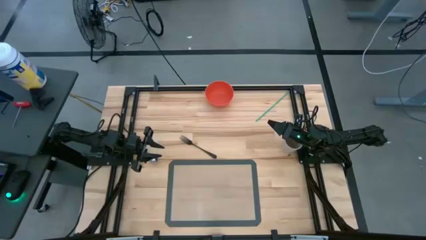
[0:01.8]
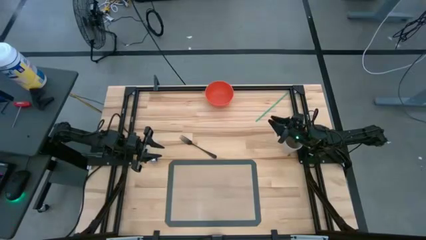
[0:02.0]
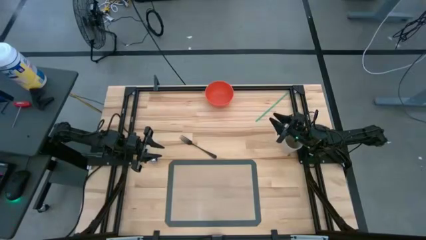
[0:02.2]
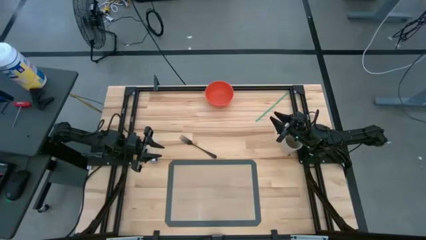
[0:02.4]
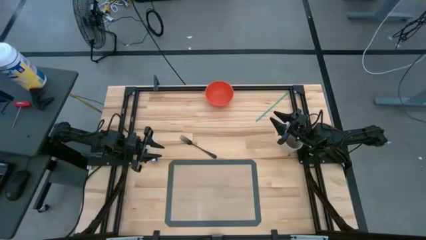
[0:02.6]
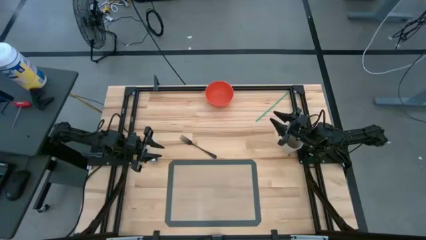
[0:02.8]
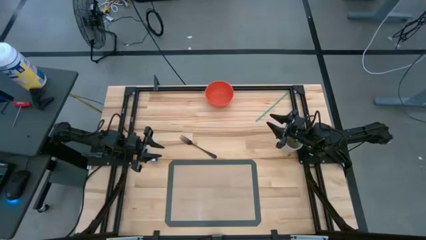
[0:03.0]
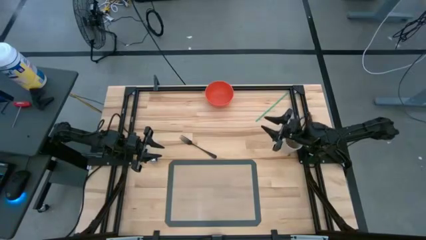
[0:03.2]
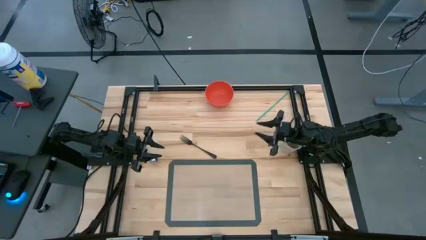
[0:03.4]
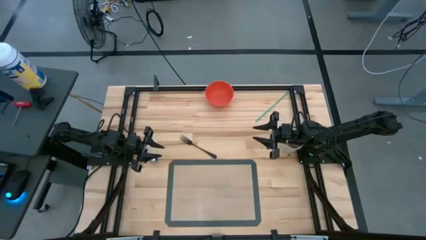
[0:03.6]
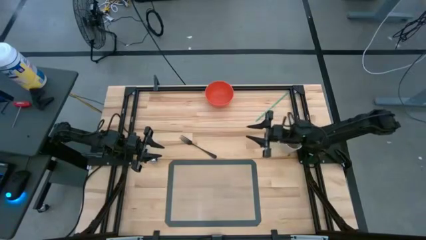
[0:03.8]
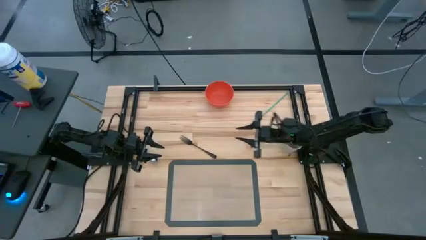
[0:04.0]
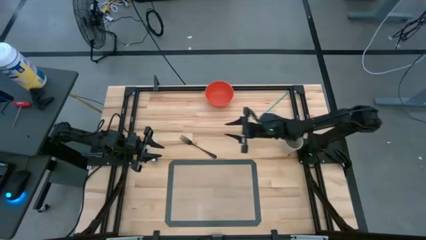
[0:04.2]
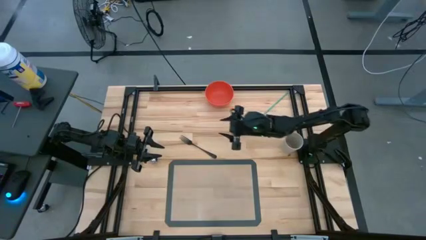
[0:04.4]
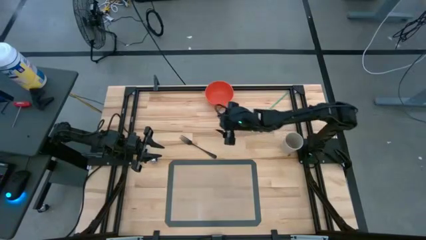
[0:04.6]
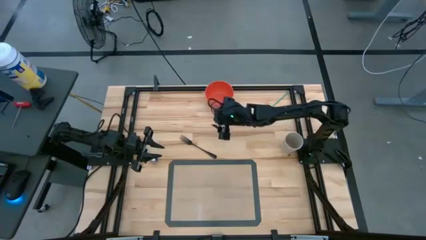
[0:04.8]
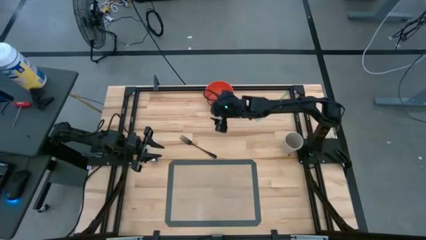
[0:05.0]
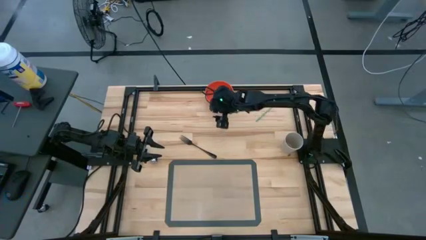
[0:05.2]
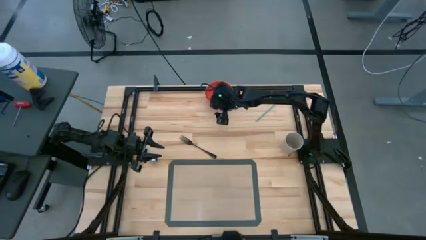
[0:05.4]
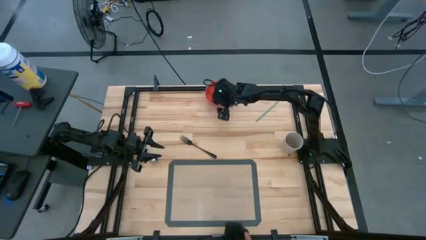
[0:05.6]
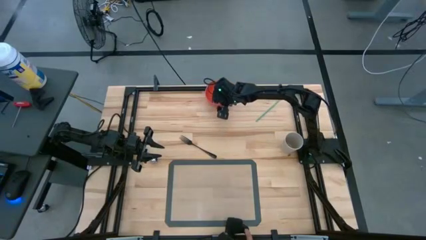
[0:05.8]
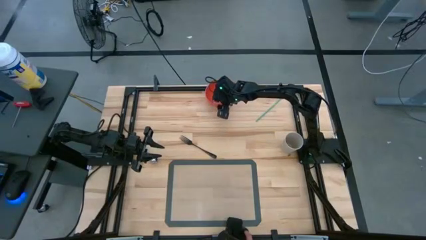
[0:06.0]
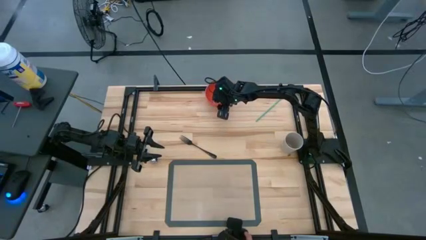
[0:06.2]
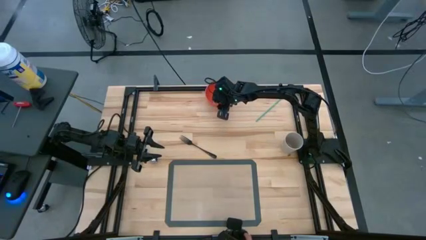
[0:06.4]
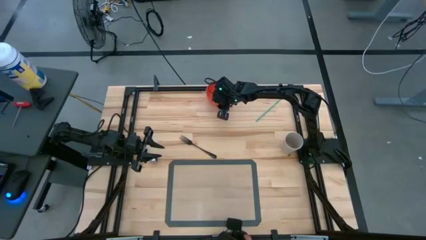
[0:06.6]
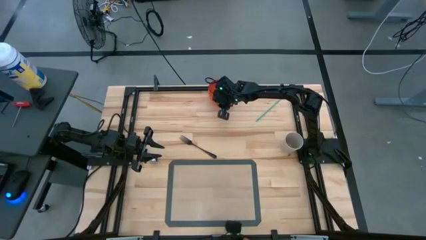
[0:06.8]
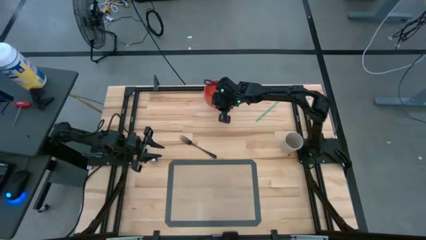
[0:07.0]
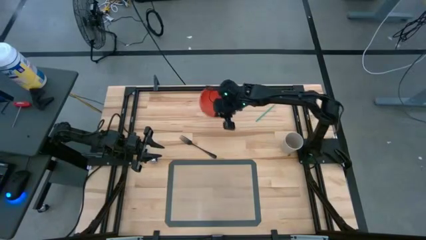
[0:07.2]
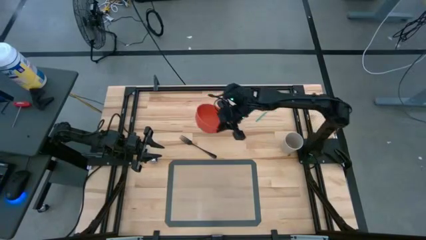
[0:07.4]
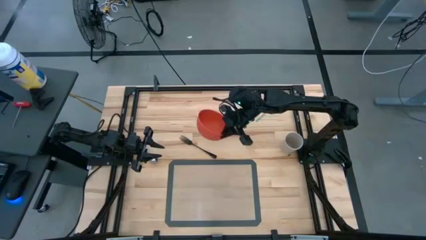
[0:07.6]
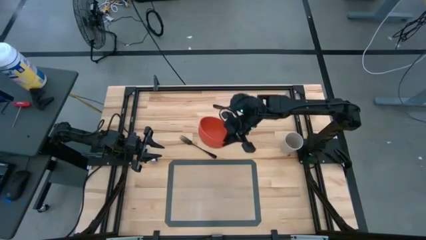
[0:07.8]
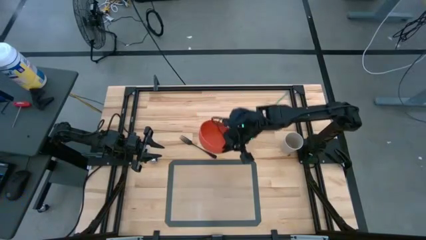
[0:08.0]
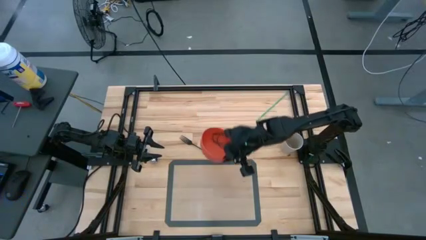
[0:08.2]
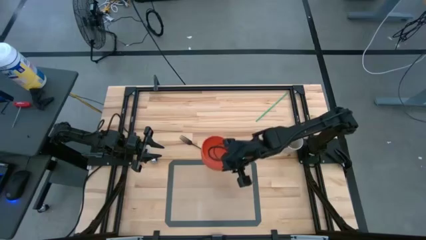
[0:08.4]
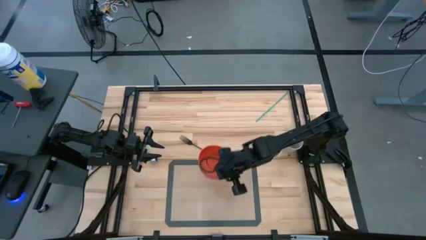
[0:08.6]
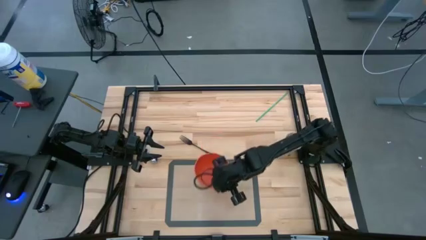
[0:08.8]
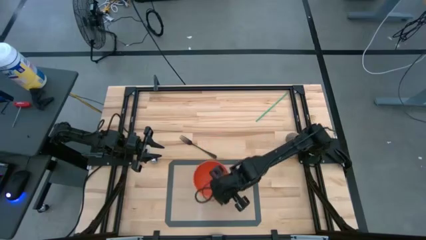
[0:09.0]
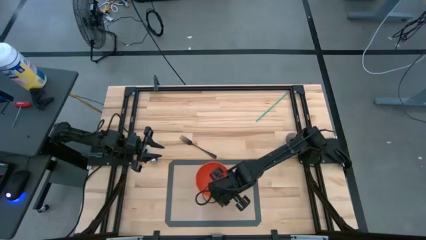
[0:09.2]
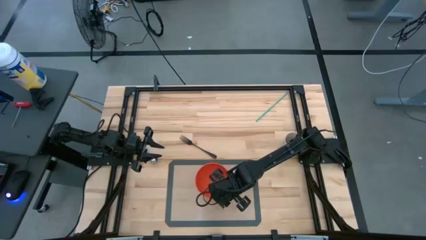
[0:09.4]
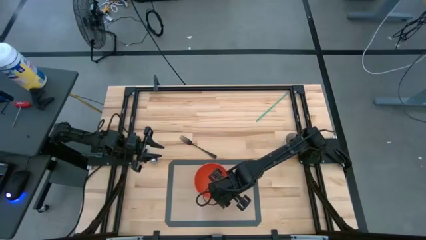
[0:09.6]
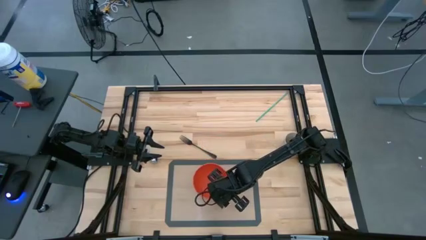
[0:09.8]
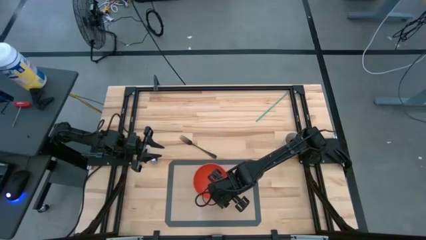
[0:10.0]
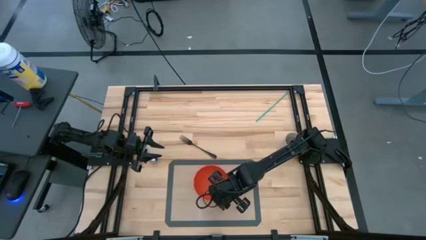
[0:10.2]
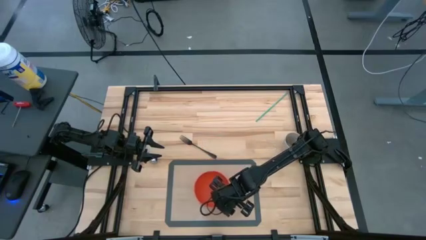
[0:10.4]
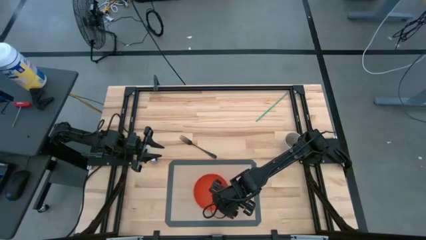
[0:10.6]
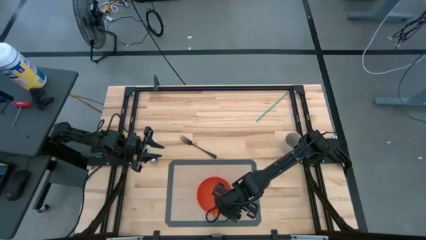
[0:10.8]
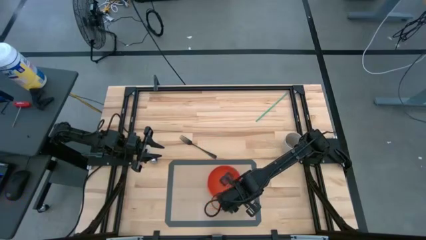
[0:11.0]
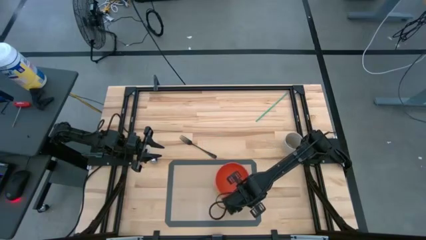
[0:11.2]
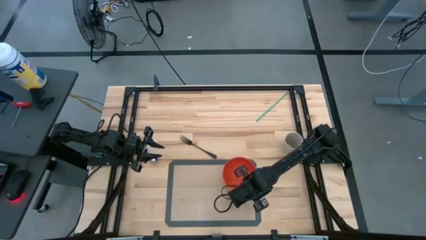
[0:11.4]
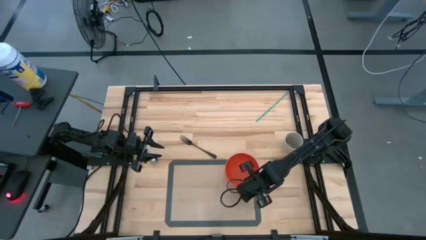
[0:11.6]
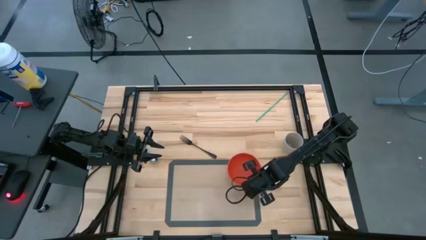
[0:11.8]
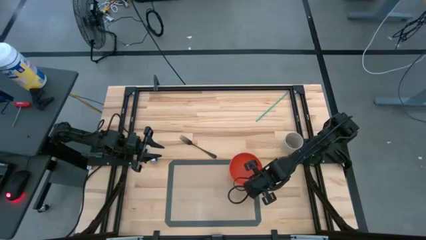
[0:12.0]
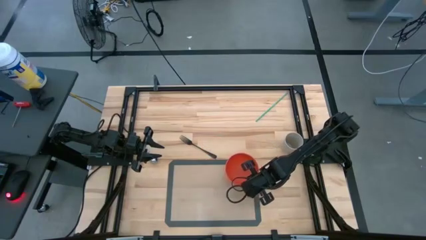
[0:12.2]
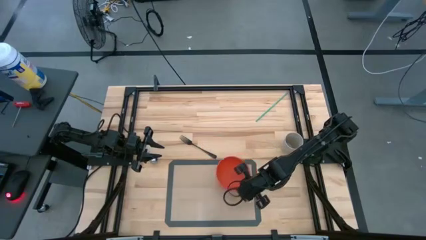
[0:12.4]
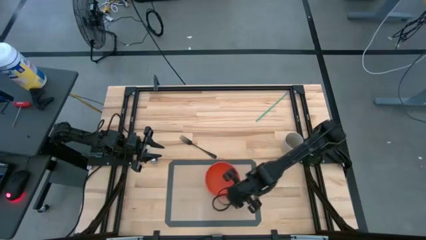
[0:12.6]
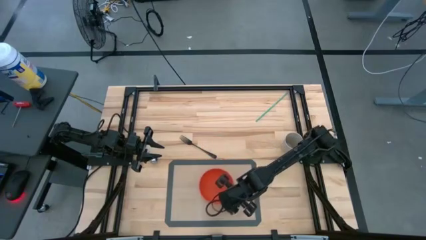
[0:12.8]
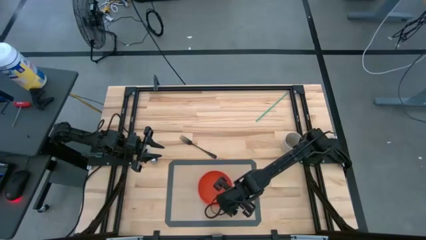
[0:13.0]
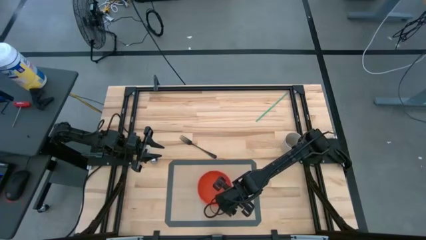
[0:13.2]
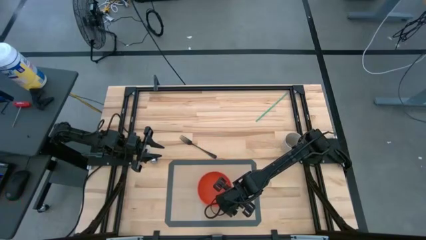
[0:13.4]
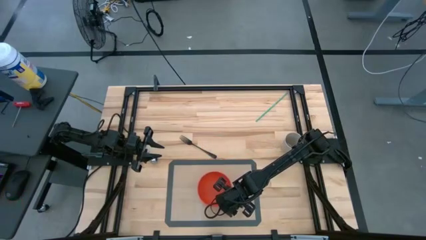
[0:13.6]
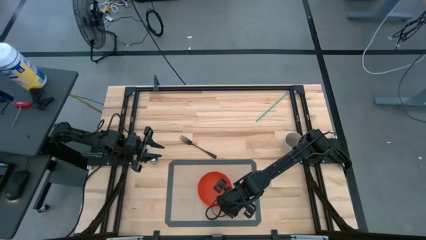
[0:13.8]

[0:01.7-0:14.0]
Task: Pick & Place Utensil
Put the orange bowl on the gray mat
